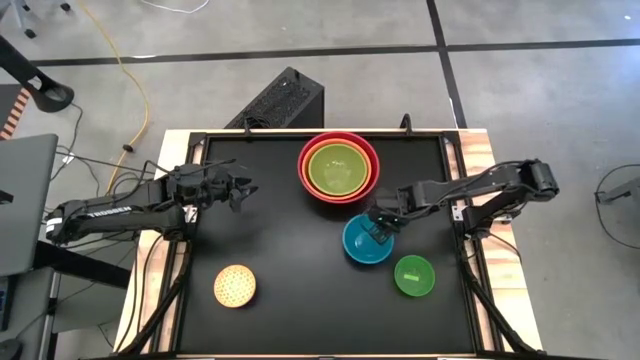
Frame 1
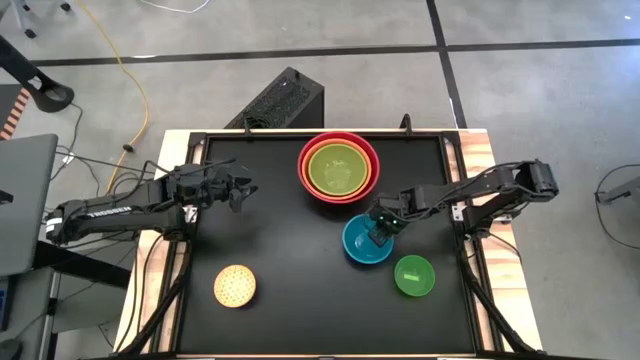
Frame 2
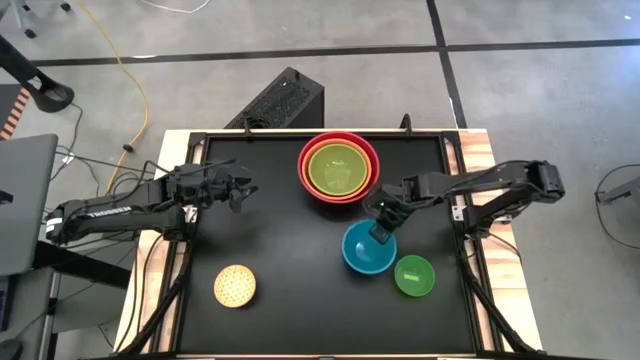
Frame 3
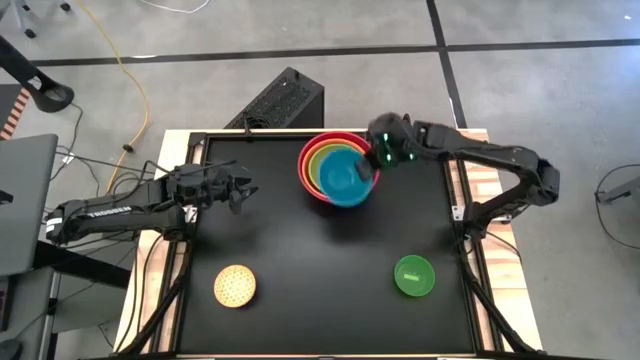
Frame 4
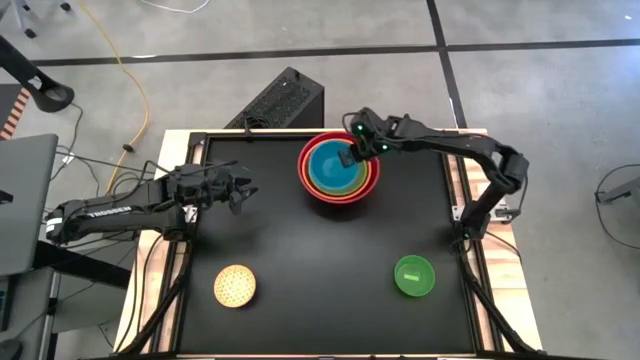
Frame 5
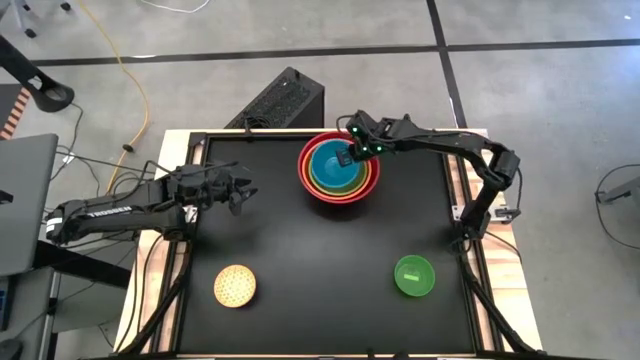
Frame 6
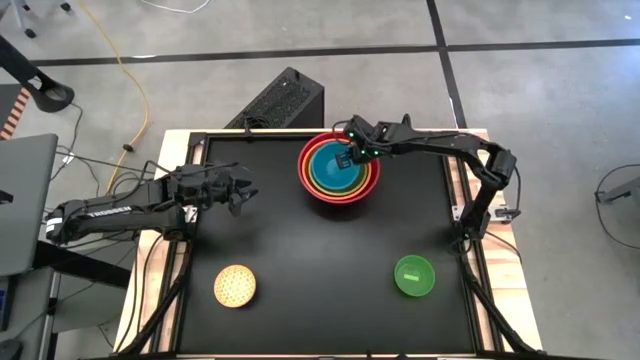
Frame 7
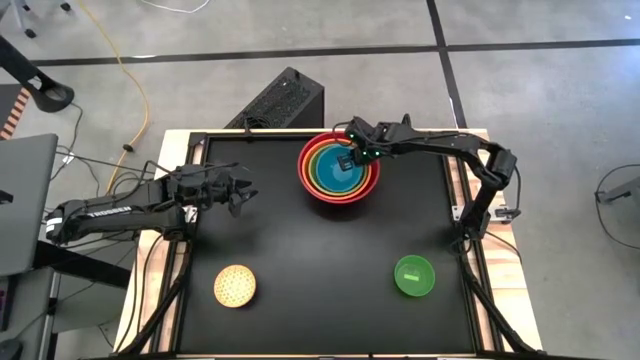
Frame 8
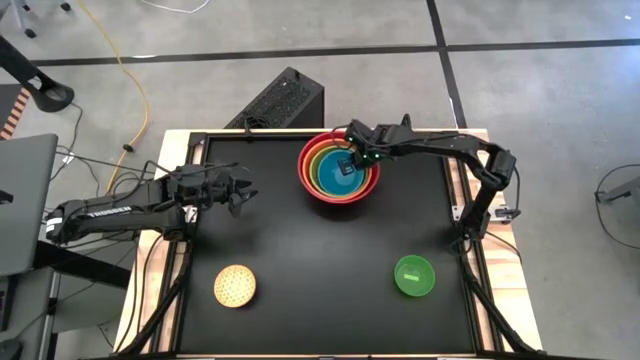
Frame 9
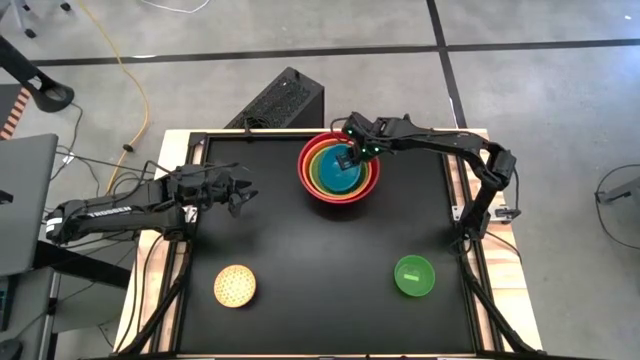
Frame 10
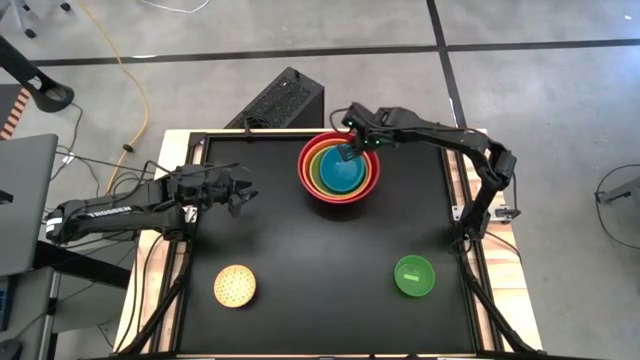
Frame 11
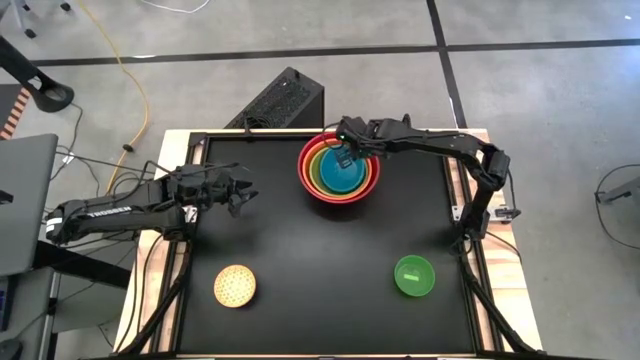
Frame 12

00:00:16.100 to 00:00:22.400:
Stack the blue bowl on top of the light green bowl

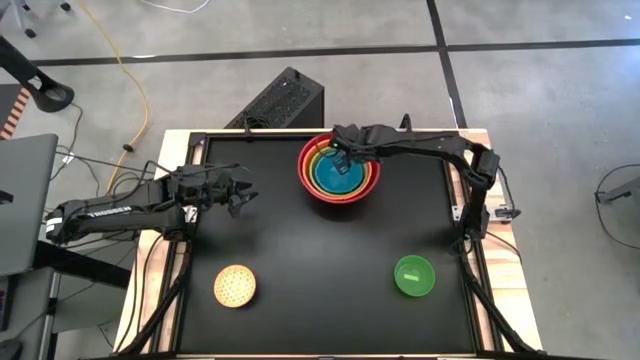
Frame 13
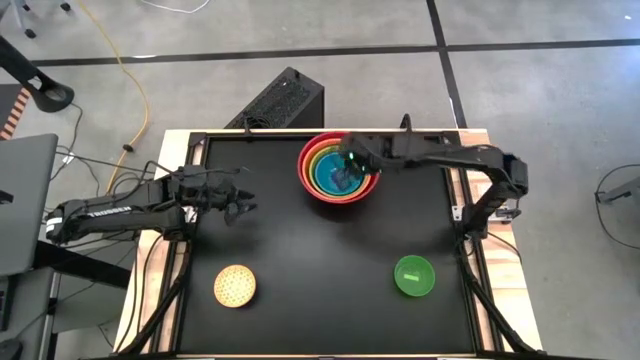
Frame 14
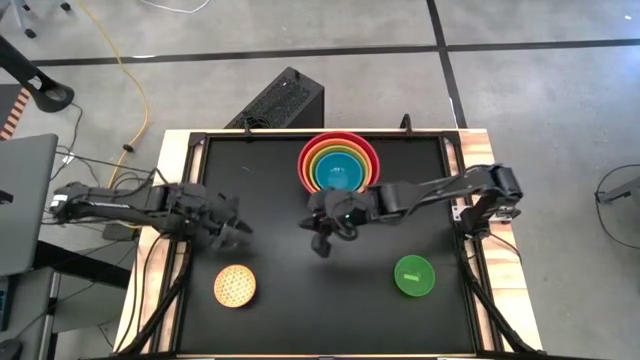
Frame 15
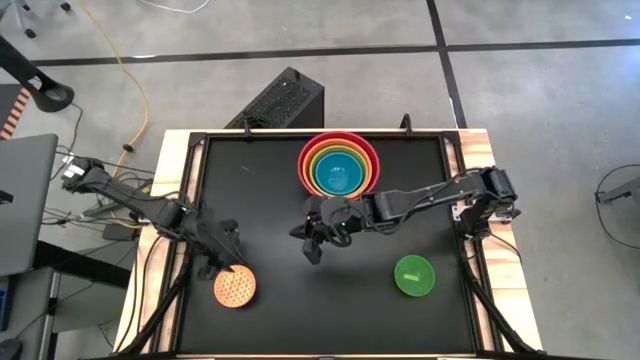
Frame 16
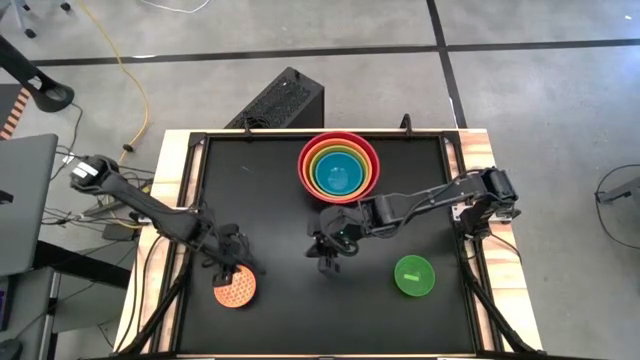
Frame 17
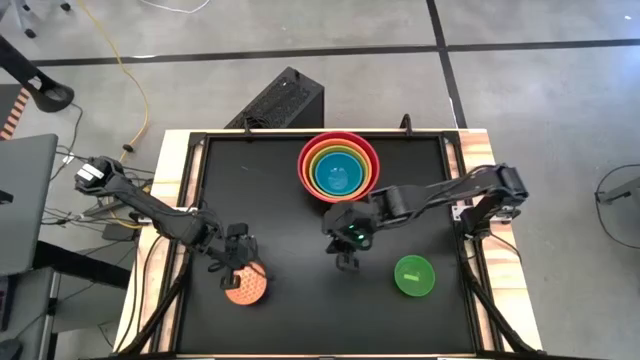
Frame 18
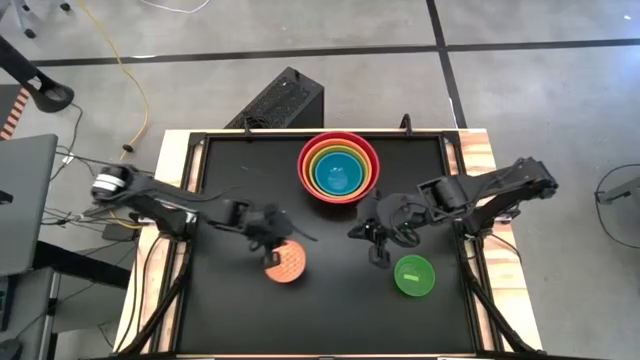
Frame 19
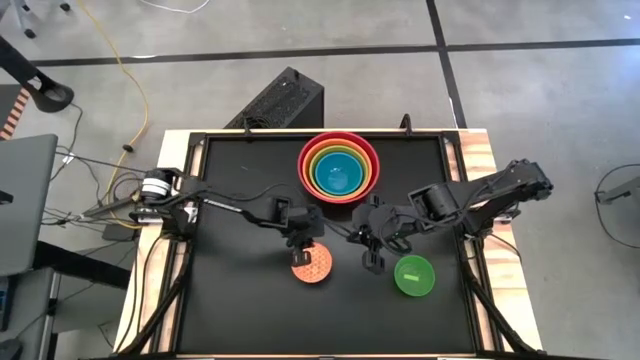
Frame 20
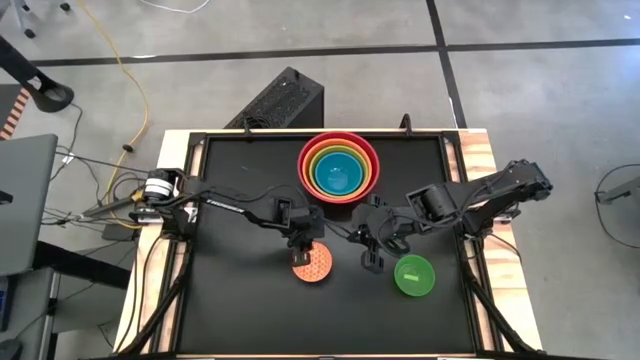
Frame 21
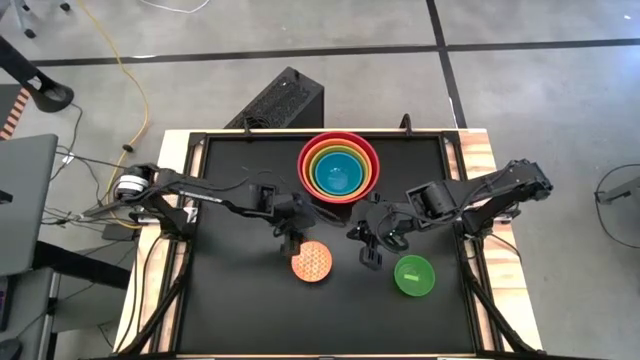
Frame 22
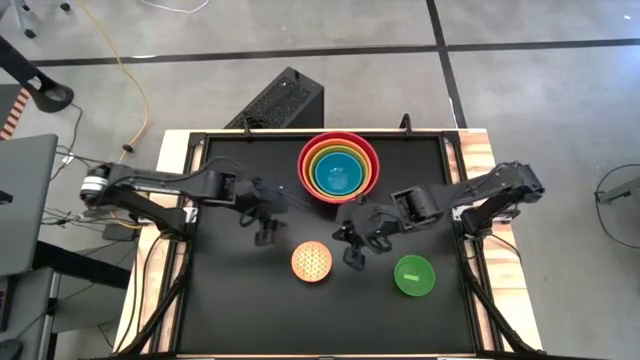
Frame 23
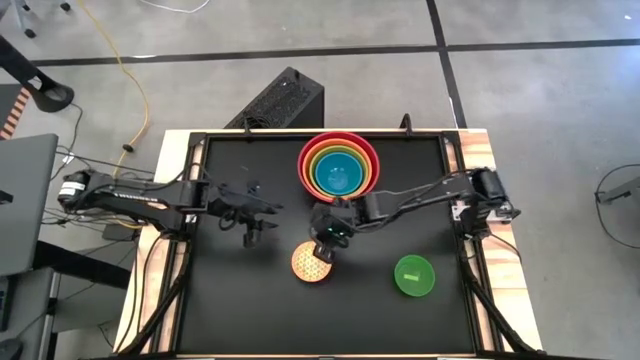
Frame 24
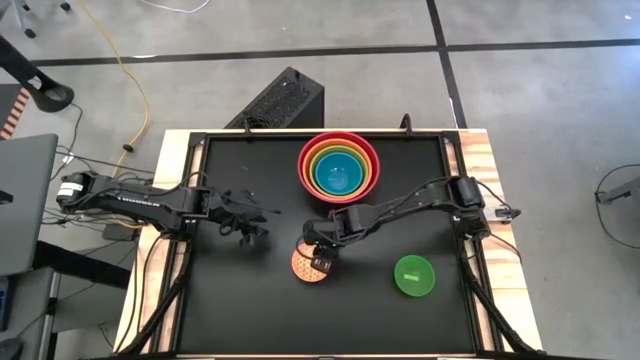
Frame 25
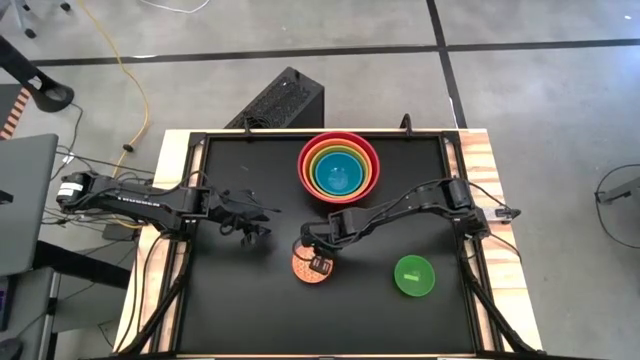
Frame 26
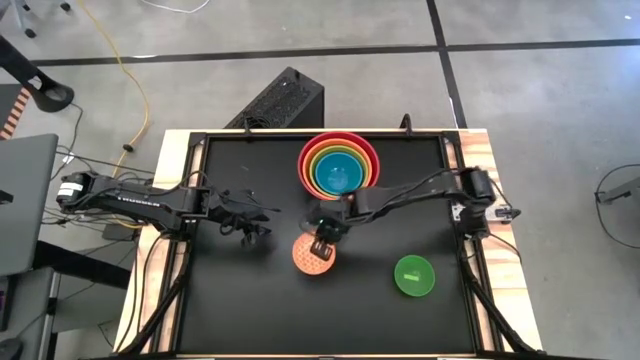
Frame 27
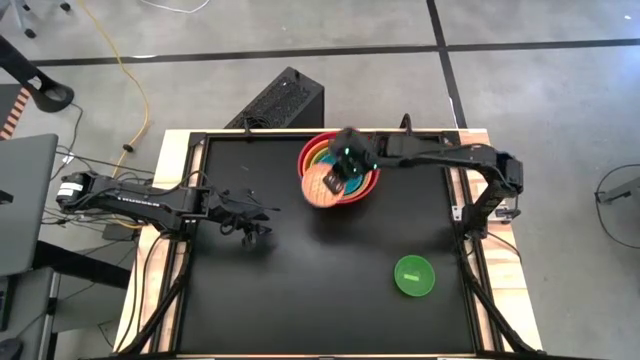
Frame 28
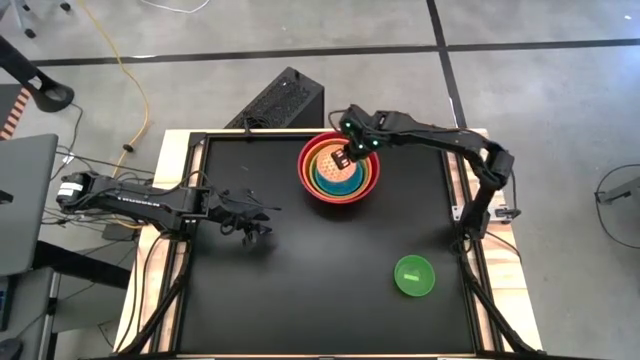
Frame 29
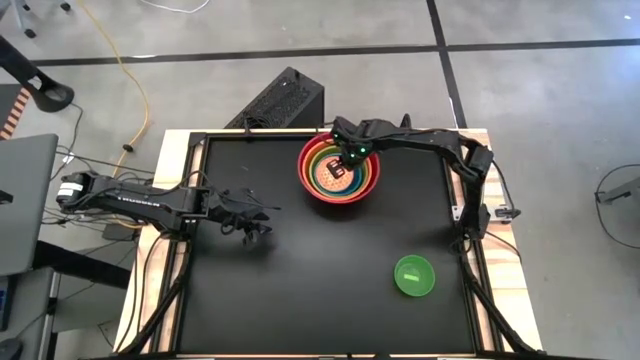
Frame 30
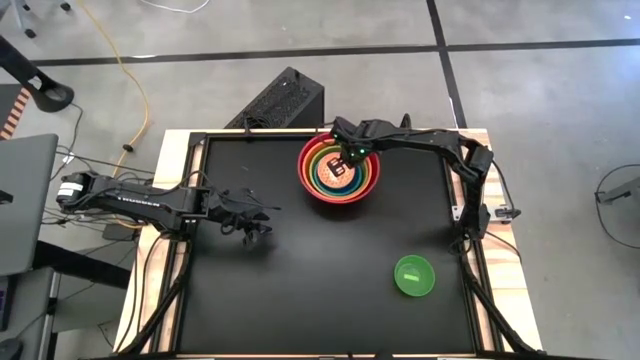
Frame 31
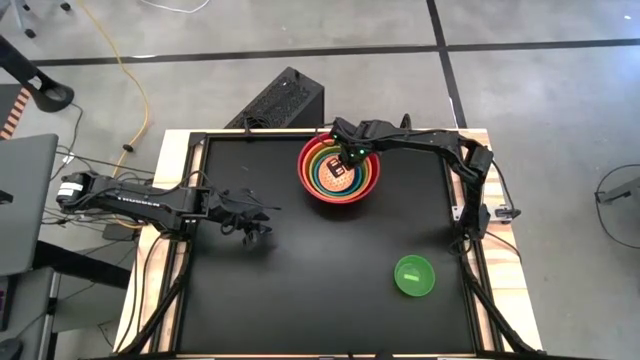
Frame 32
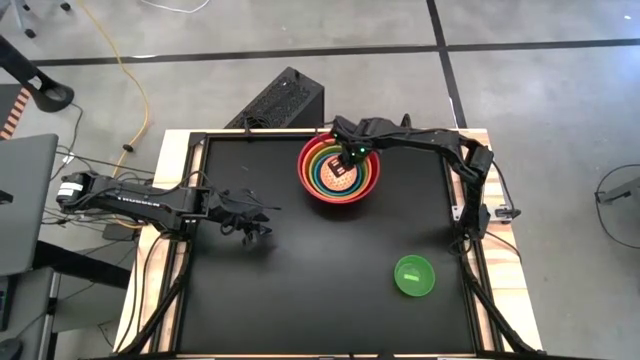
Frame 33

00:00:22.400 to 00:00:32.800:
Stack the orange patterned bowl on top of the blue bowl

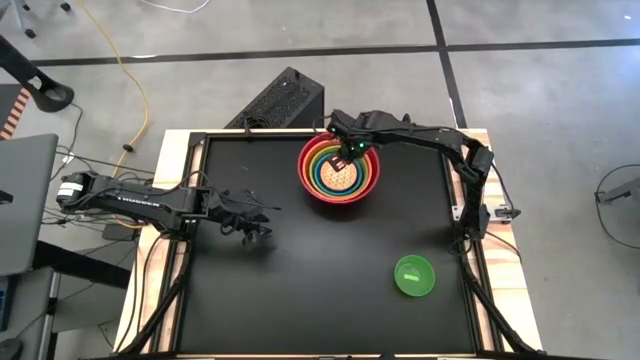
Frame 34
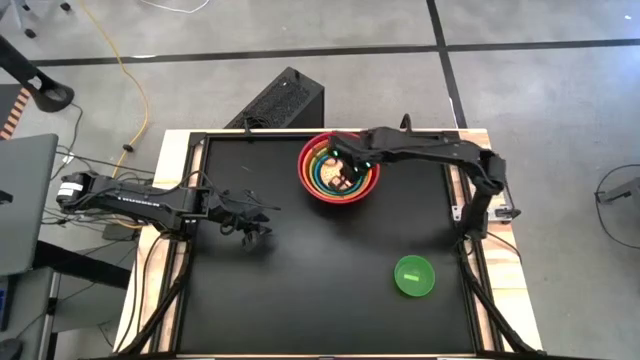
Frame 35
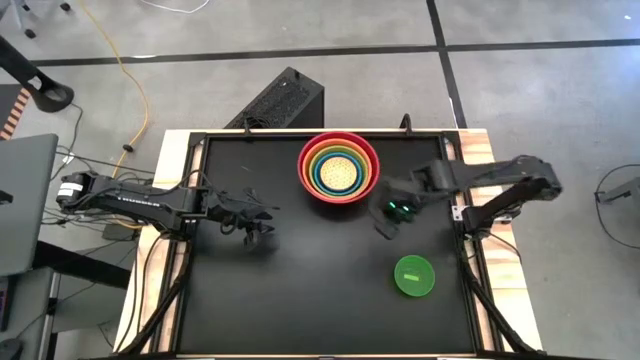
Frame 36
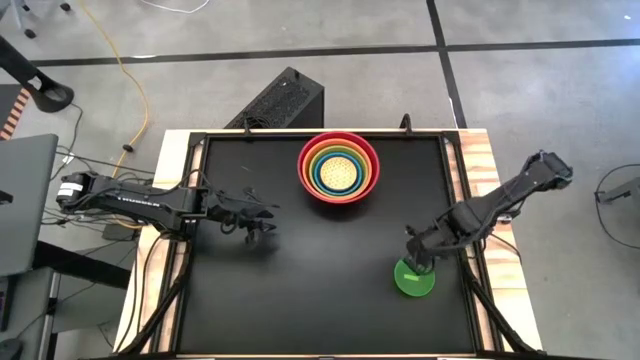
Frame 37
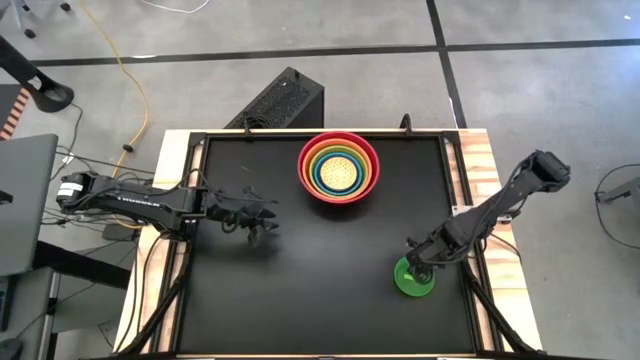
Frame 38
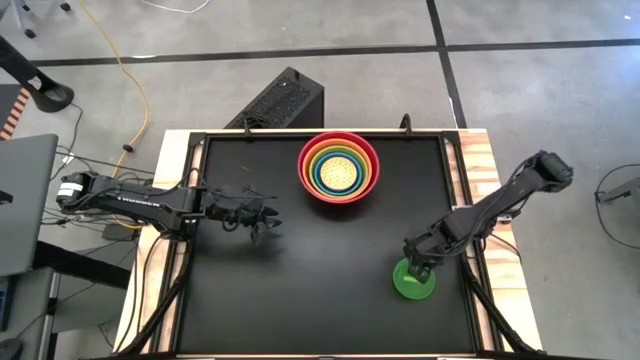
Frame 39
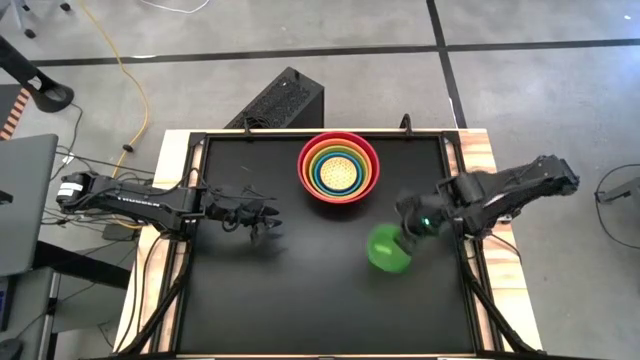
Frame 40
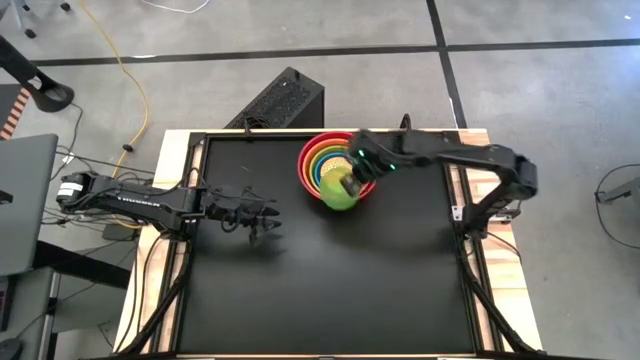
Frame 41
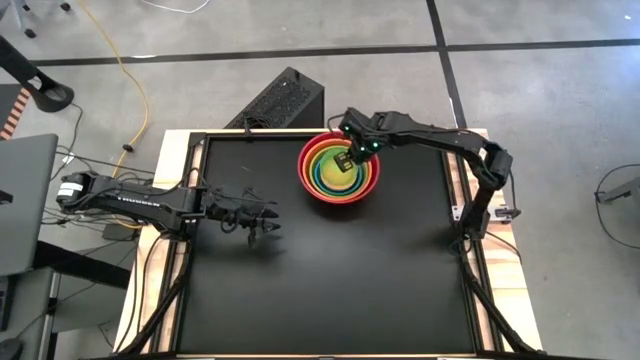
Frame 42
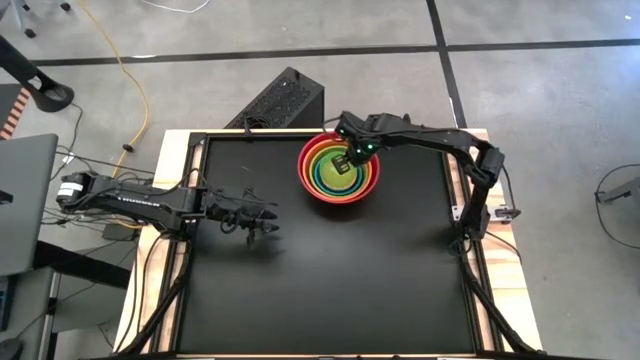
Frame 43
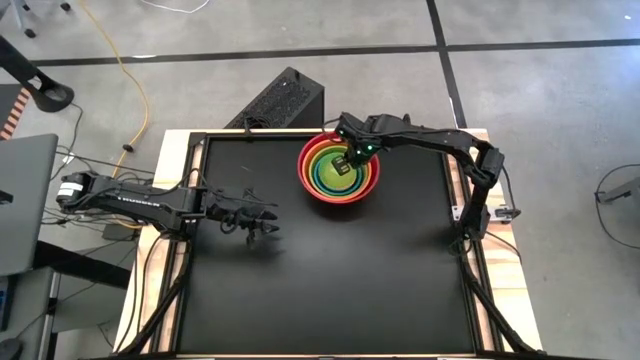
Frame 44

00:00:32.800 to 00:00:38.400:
Stack the green bowl on top of the orange patterned bowl
